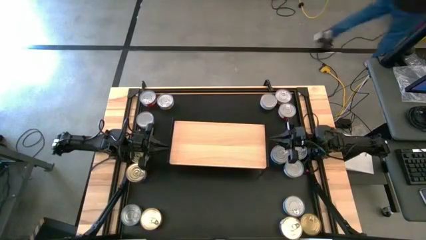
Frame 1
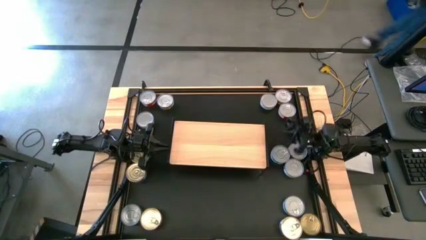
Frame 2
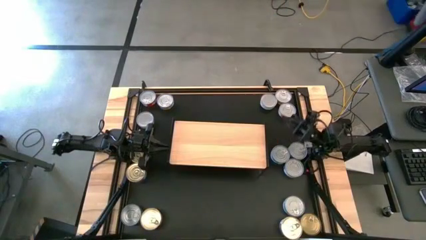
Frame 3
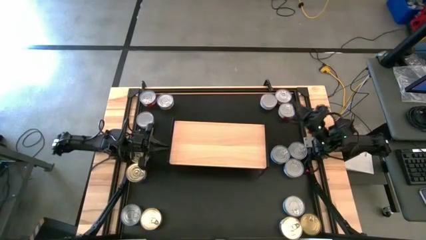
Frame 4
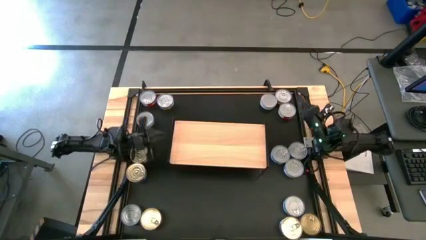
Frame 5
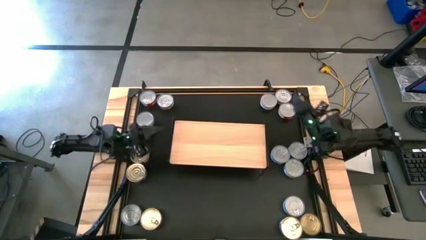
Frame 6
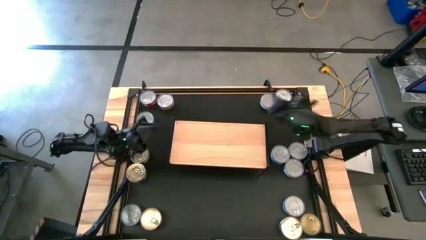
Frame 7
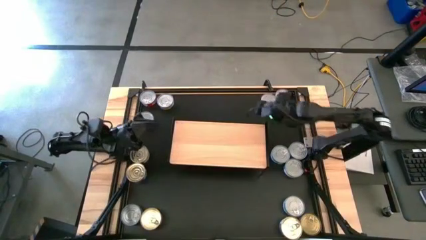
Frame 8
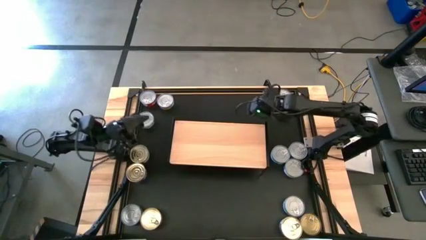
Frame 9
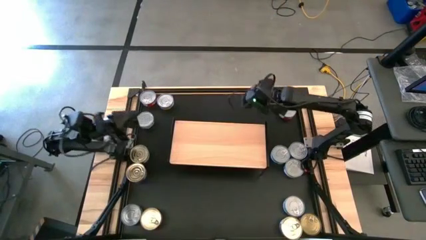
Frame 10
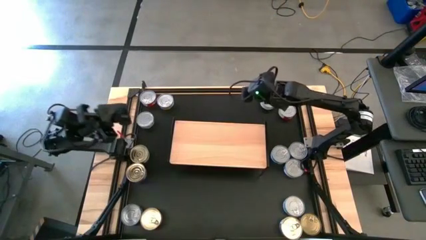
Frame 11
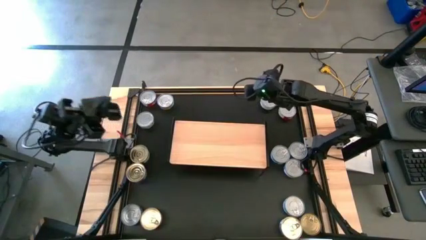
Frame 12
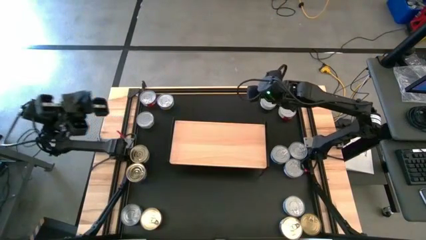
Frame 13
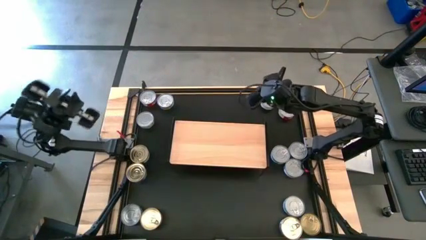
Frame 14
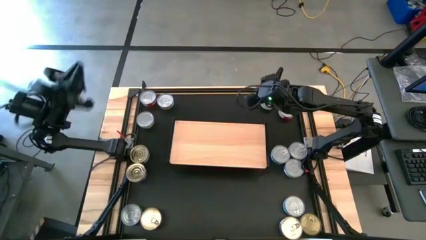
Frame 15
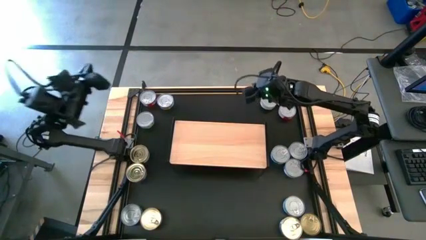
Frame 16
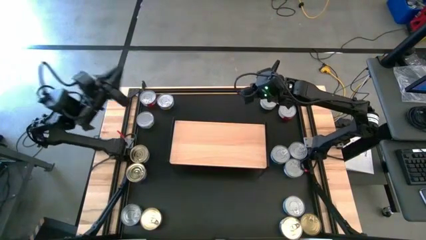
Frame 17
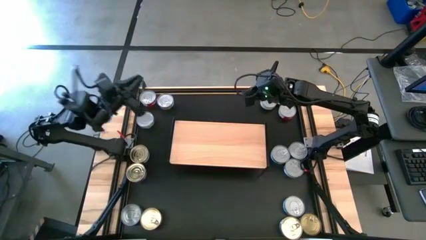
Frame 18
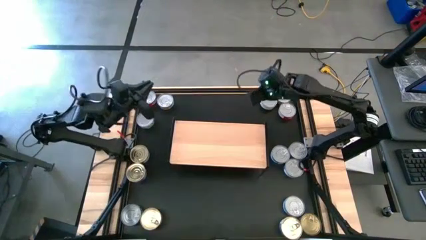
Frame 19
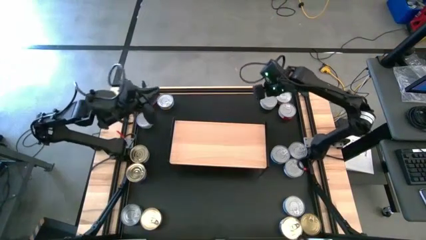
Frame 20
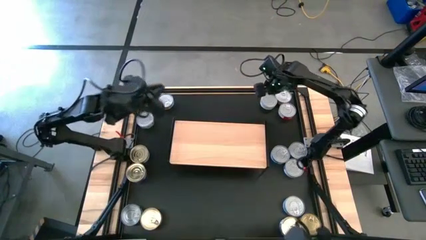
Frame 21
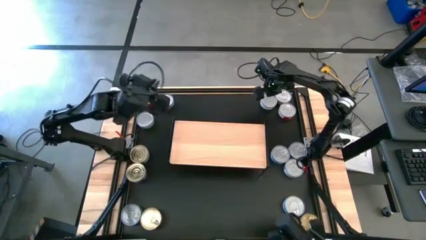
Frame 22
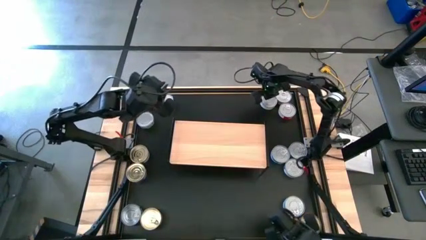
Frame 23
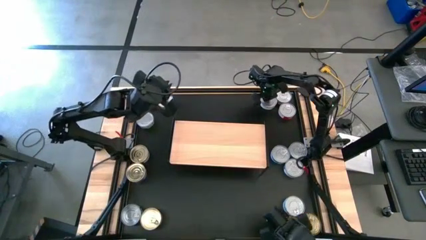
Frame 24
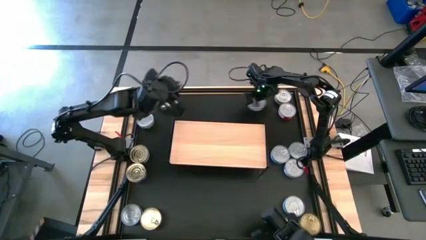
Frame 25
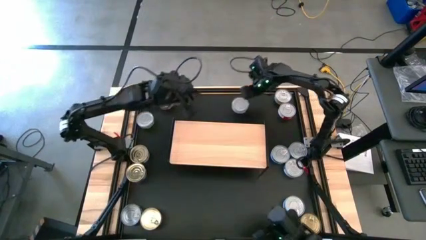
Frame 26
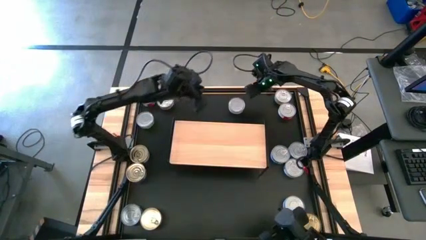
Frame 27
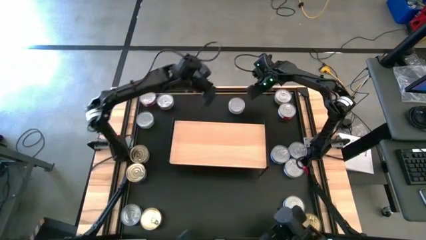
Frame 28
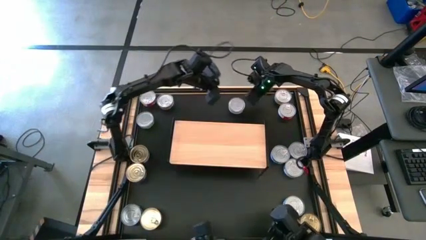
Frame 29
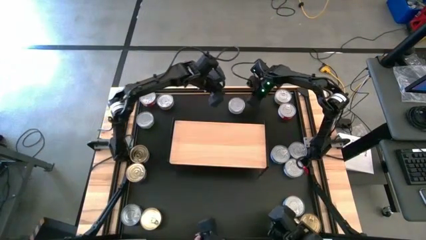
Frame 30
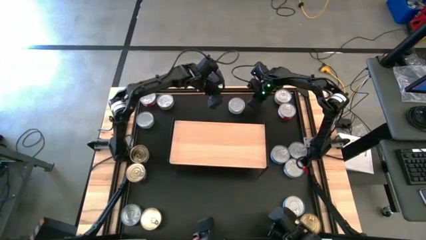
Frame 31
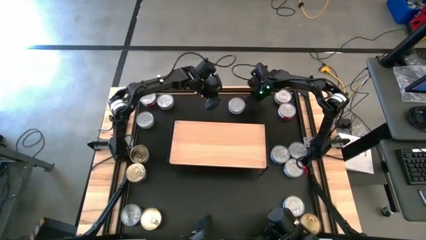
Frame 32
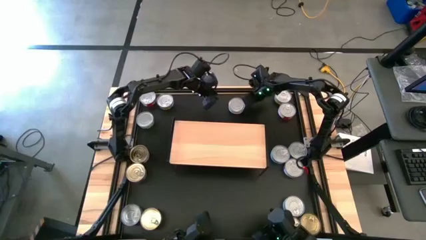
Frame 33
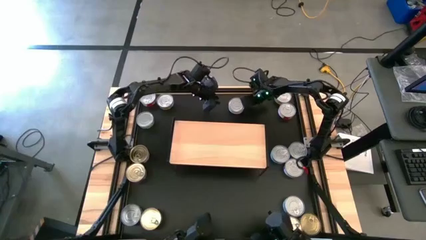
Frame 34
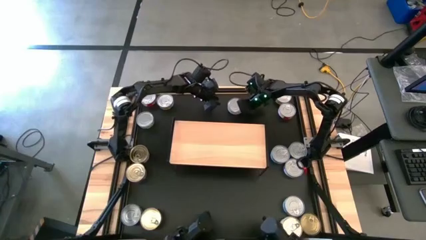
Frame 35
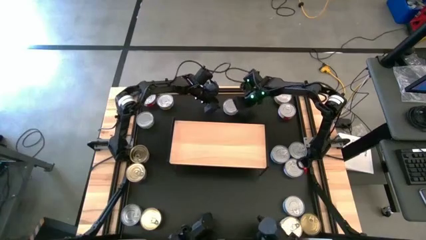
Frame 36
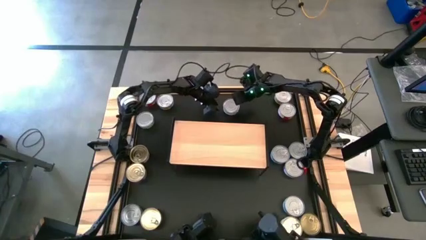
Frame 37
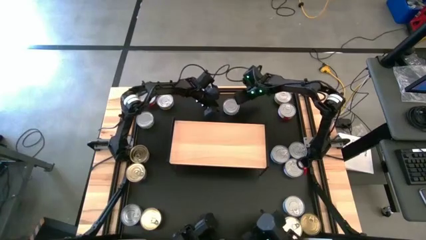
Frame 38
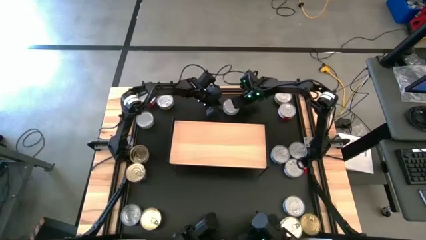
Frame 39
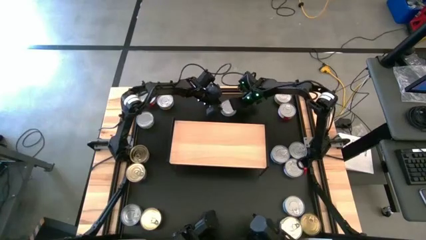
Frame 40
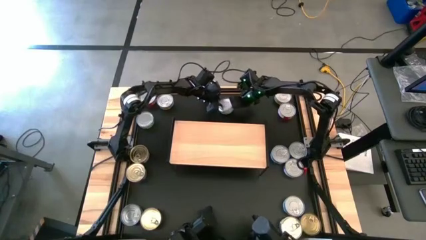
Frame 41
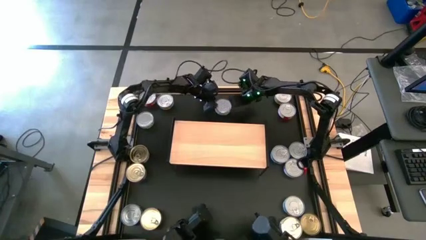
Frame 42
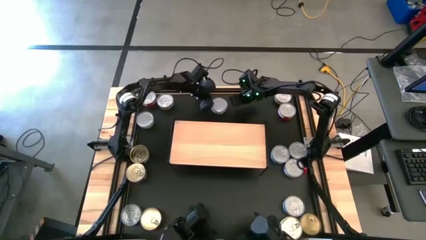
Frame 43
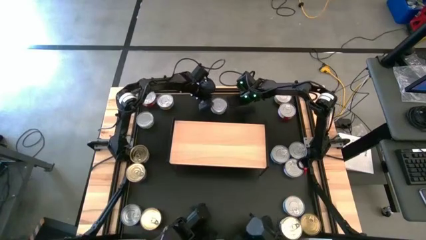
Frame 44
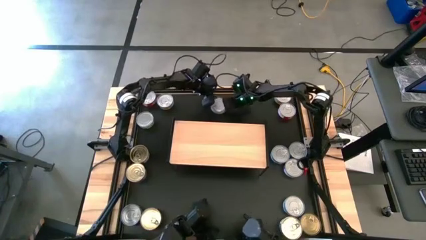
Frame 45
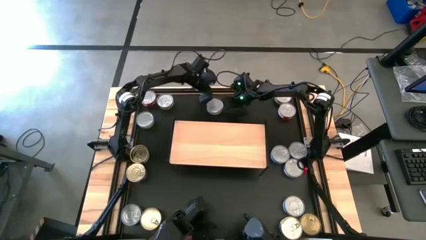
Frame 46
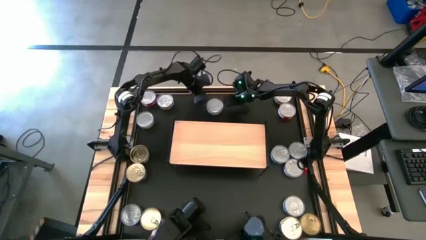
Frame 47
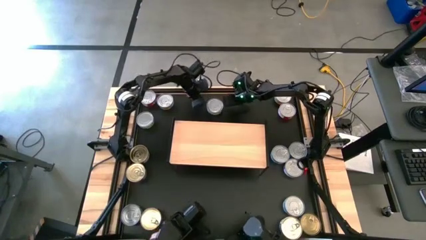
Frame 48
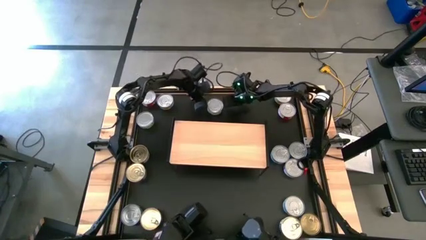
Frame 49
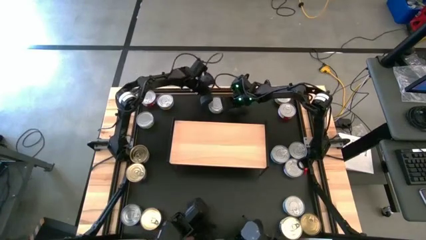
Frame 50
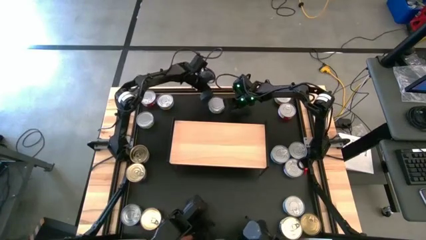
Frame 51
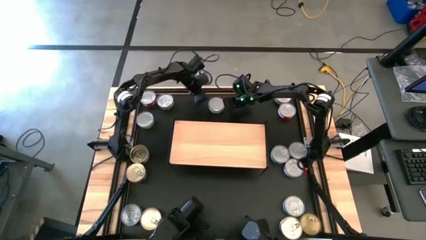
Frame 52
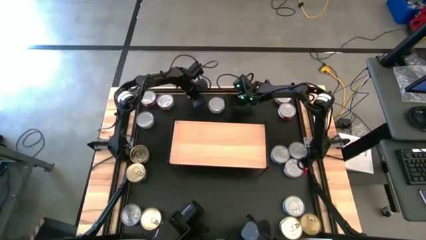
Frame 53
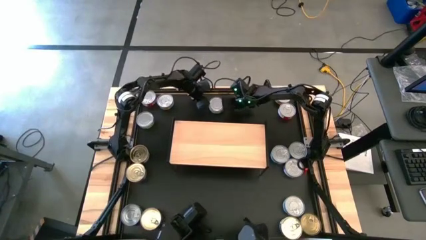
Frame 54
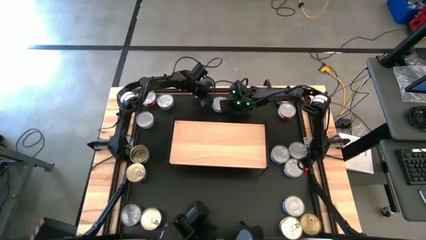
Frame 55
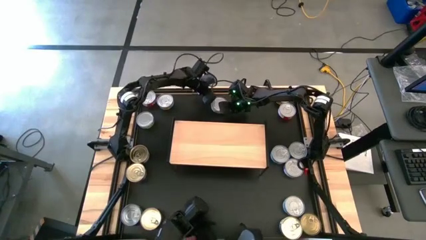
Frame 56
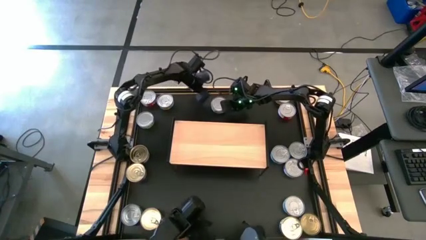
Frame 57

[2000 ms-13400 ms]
Task: Stack canned seafood by type on shelf
Put the green white tuna can on the shelf
